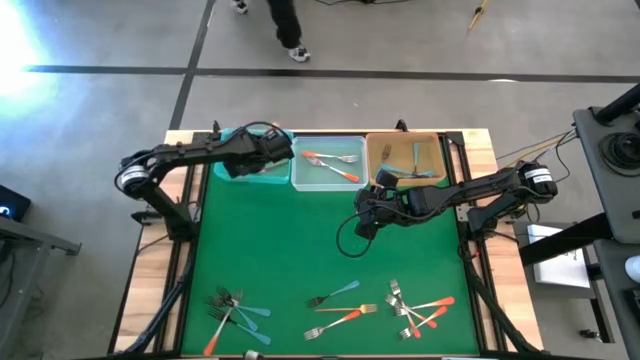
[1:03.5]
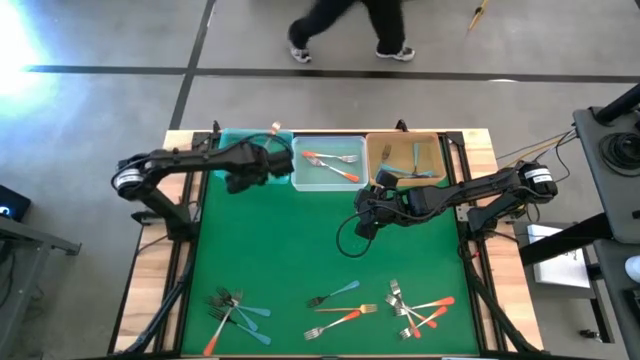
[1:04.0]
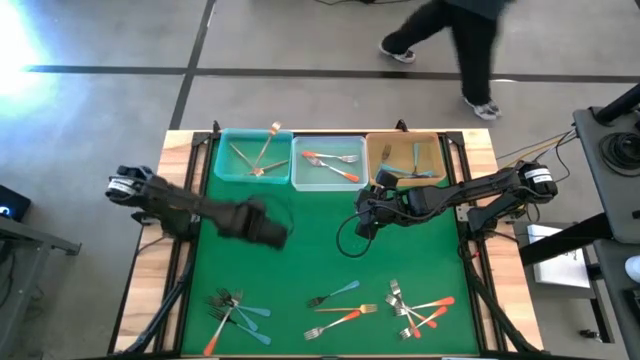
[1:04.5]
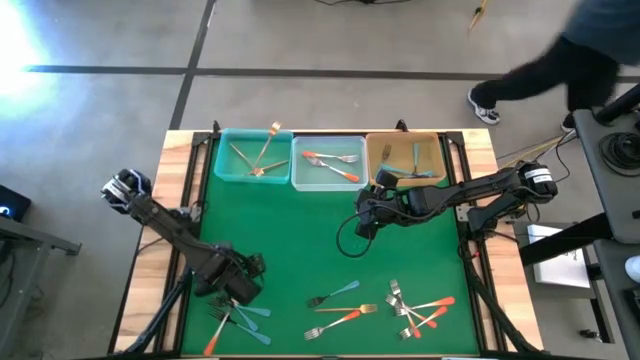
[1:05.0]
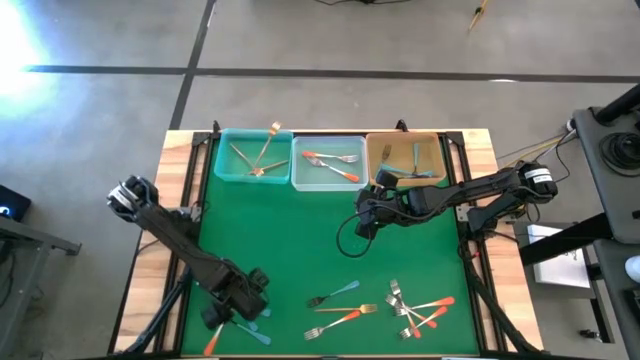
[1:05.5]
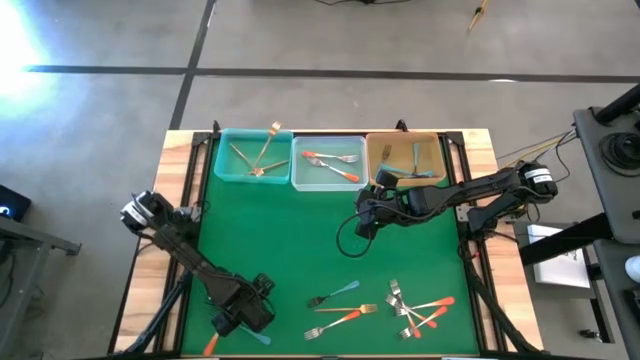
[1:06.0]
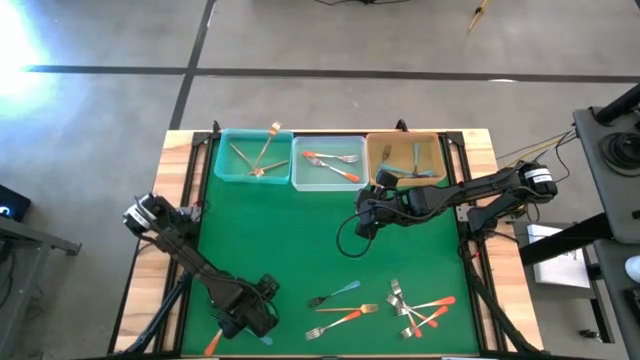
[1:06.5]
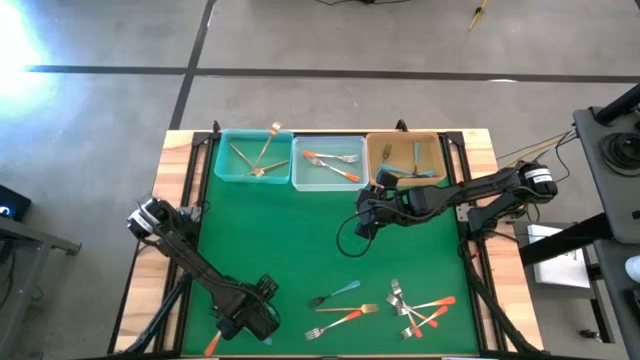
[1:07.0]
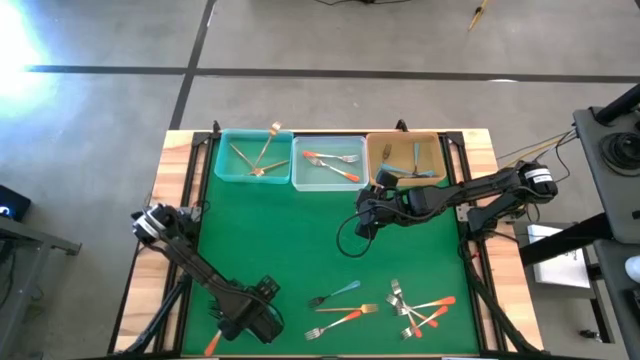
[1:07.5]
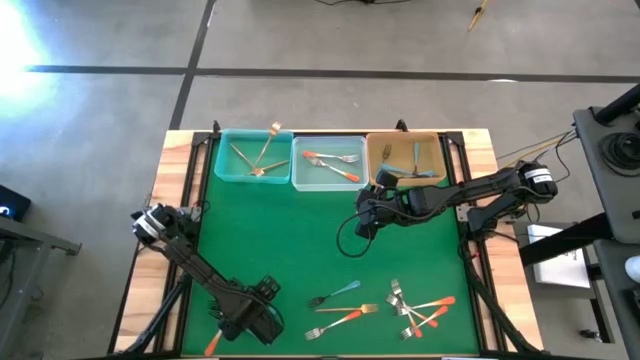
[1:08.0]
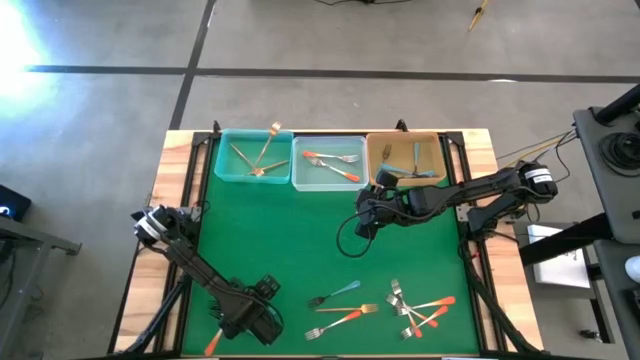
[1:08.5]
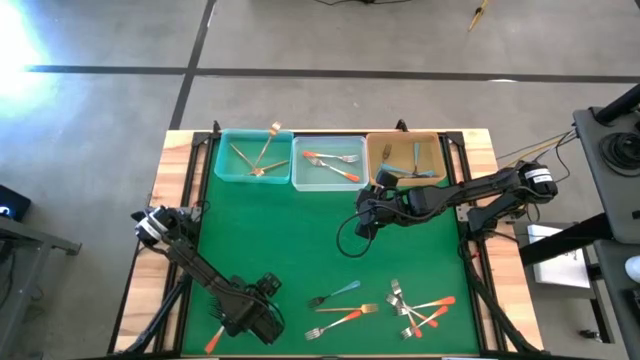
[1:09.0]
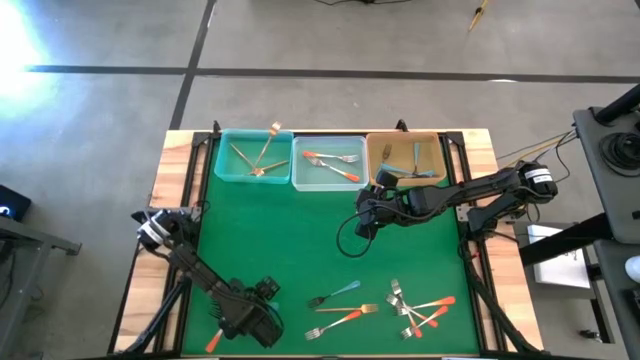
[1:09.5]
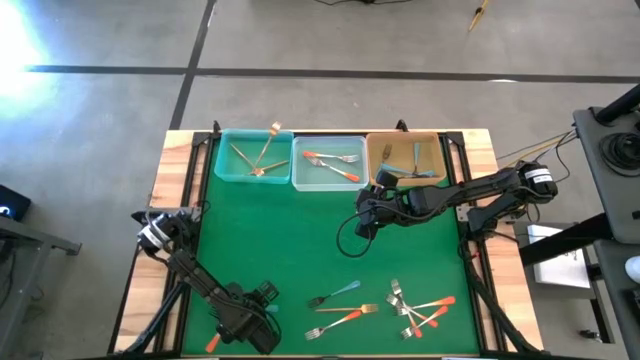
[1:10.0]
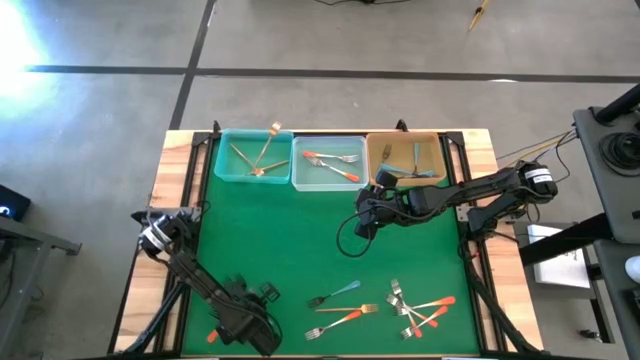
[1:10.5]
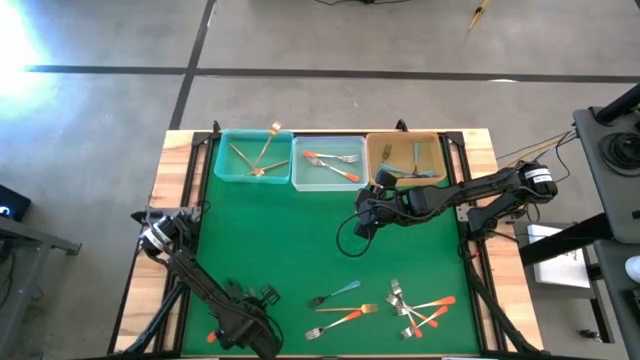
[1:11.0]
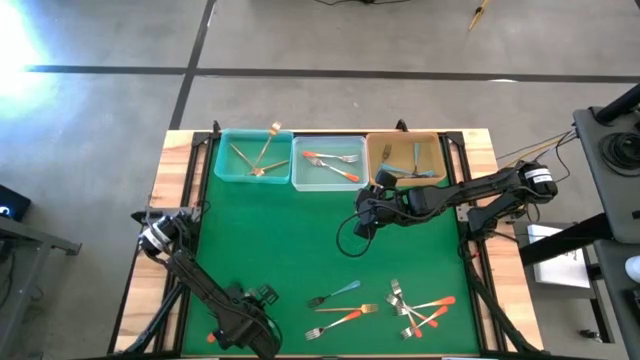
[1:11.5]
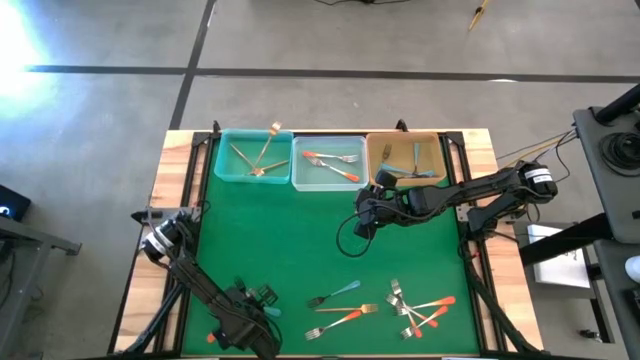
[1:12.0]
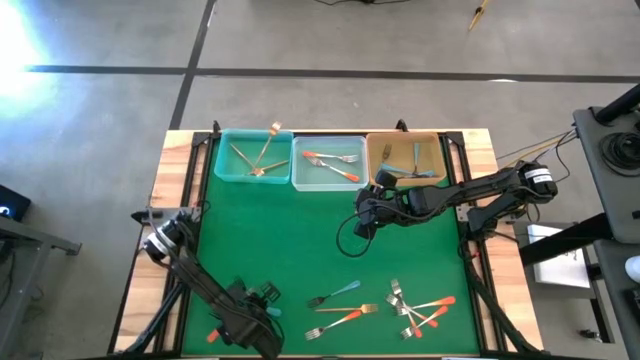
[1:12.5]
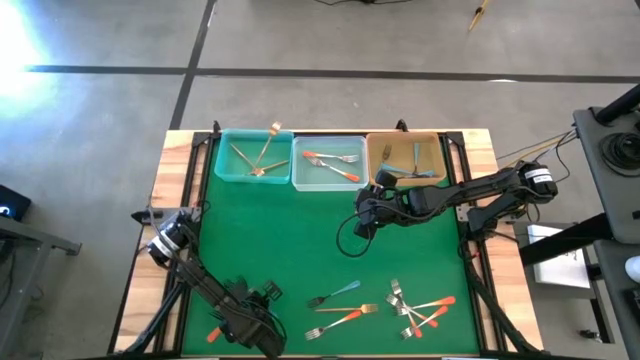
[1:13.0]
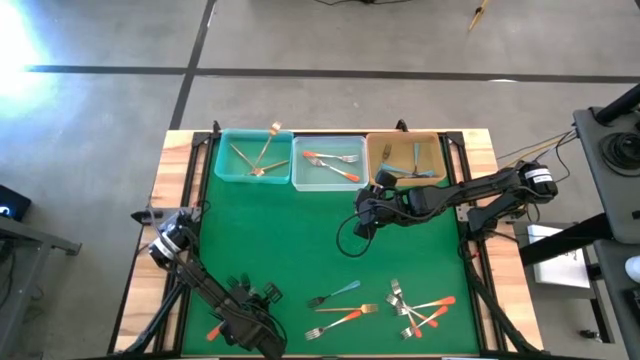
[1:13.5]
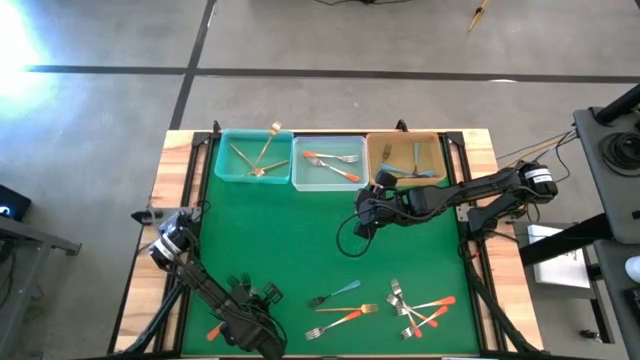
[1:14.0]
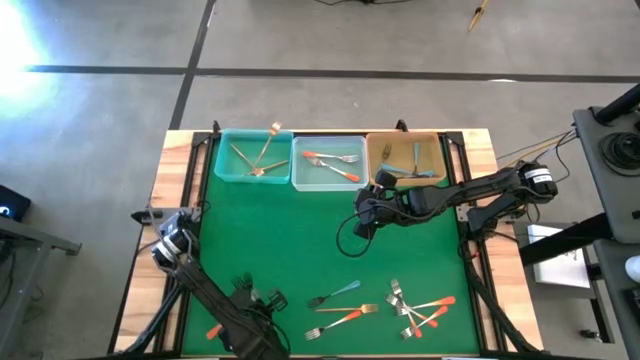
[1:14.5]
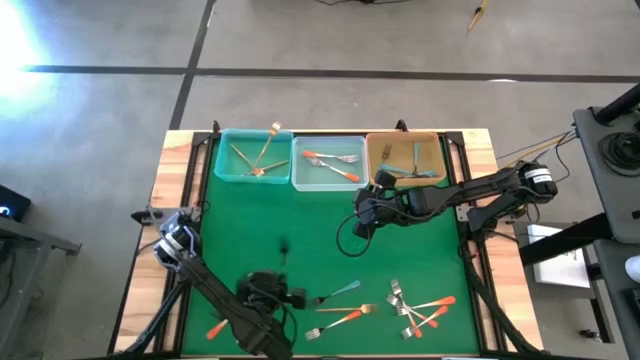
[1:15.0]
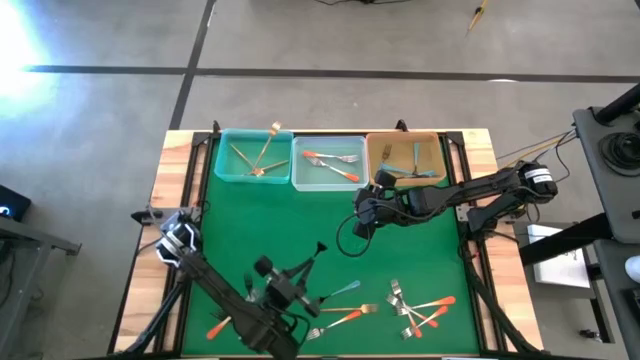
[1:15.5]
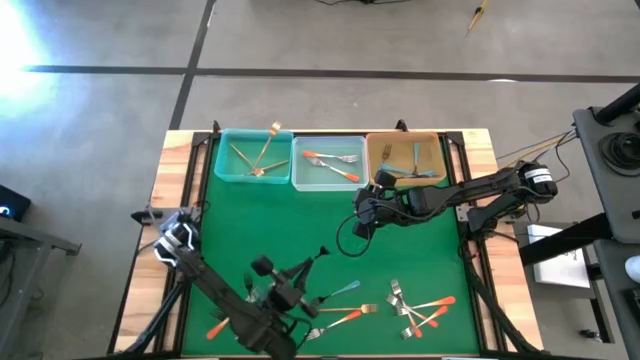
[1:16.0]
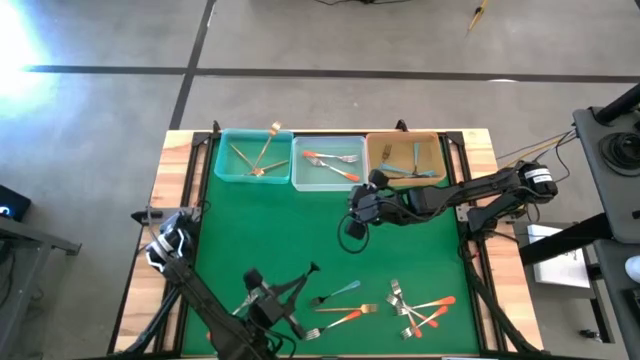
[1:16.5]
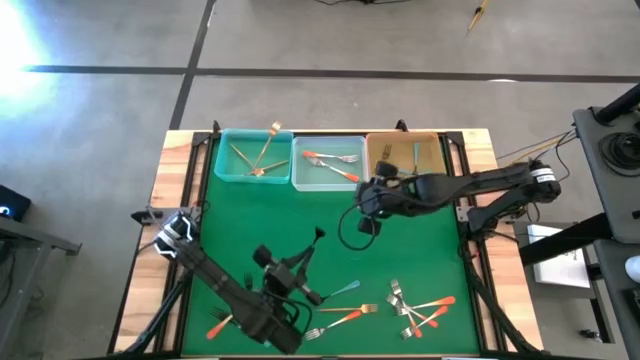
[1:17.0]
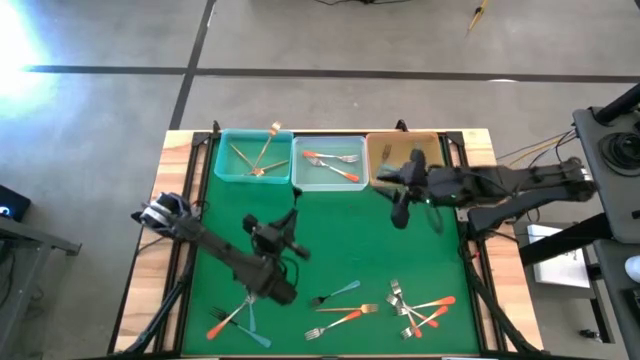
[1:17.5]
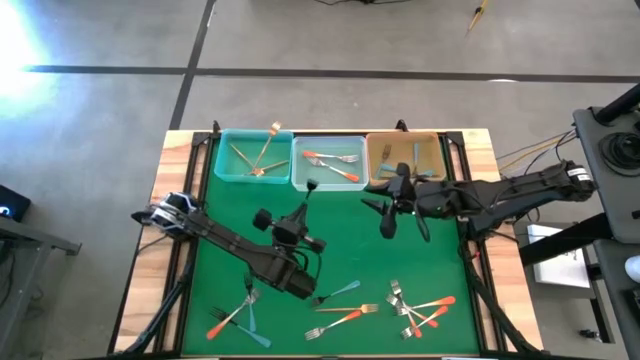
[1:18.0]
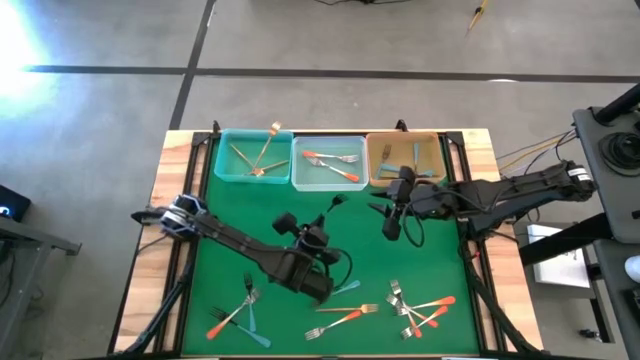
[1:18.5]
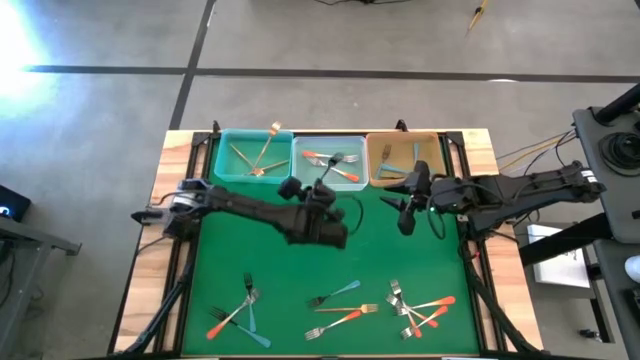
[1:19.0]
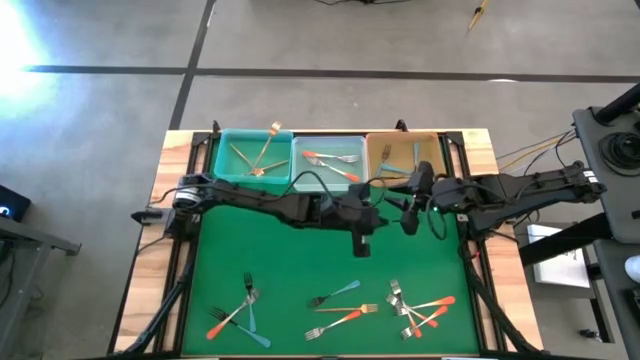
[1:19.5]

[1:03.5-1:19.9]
Task: Sort silverware by color (type)
Put the blue fork into the orange bin

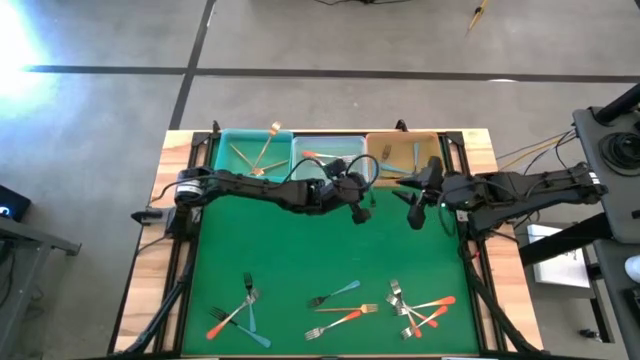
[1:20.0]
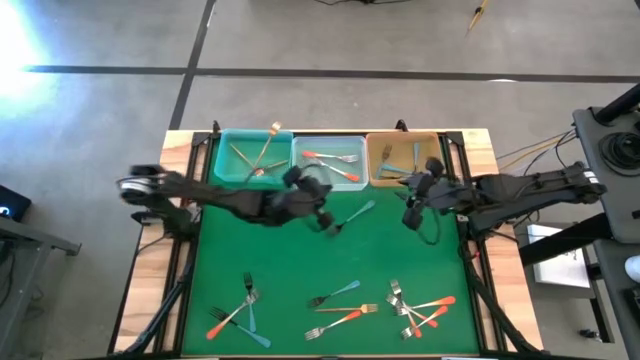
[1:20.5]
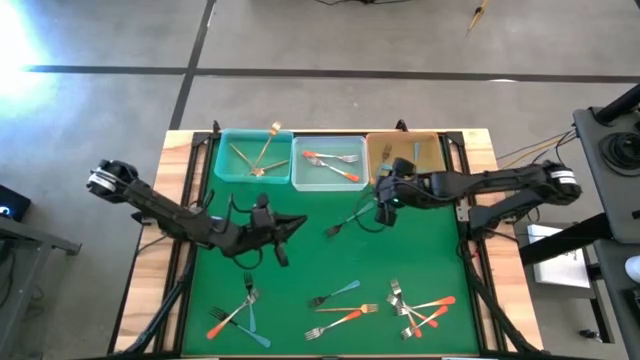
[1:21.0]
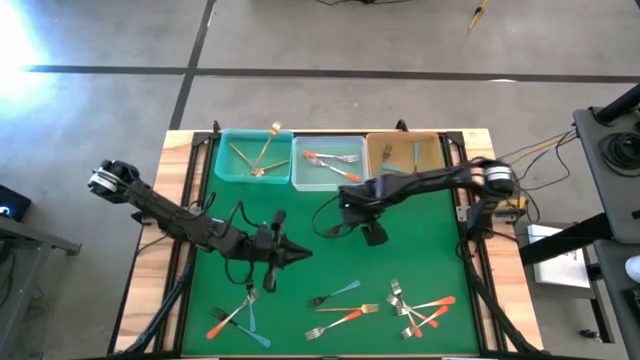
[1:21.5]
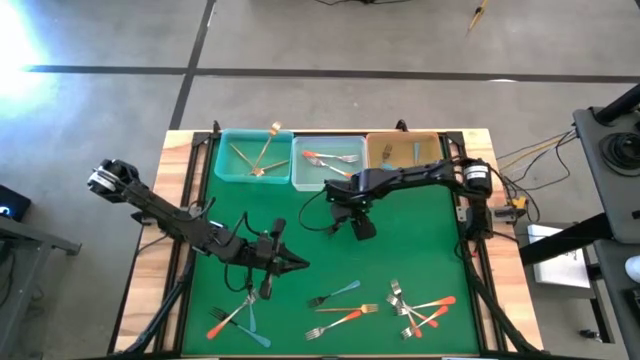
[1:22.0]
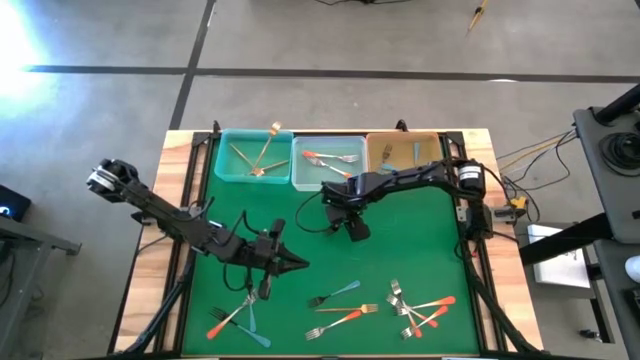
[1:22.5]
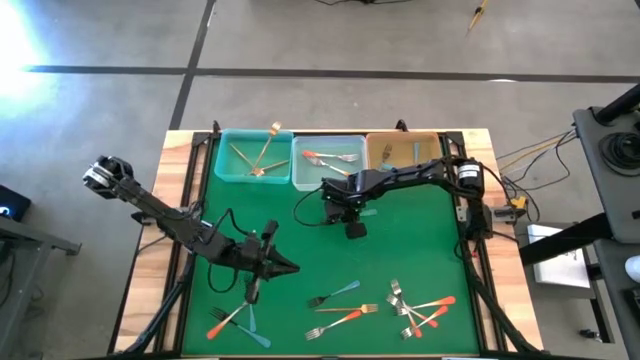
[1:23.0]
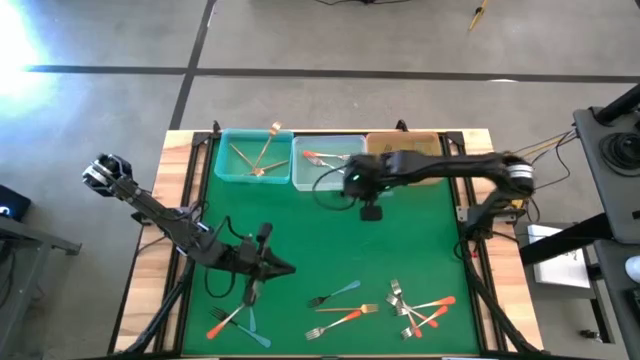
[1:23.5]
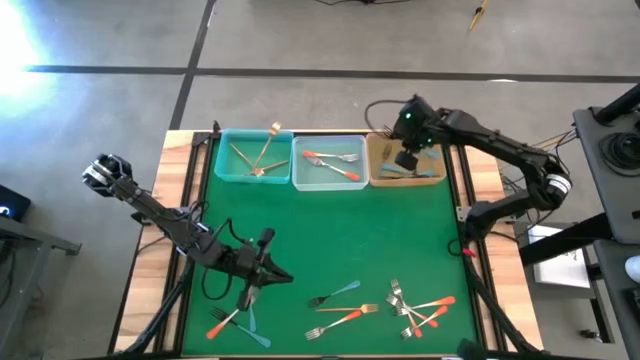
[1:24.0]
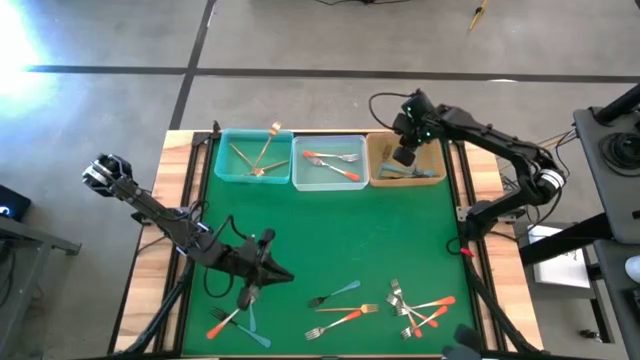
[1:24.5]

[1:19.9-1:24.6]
Put the blue fork into the orange bin
